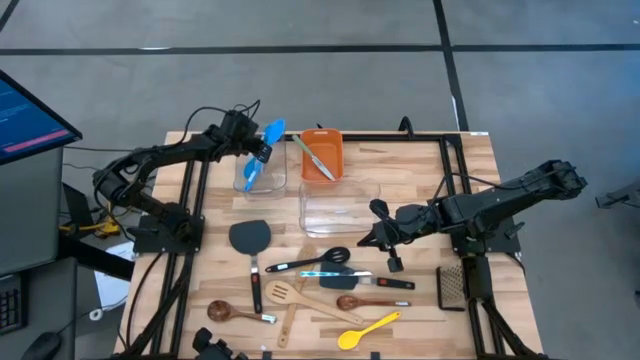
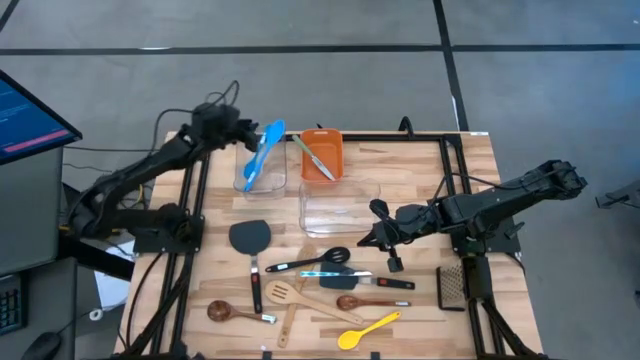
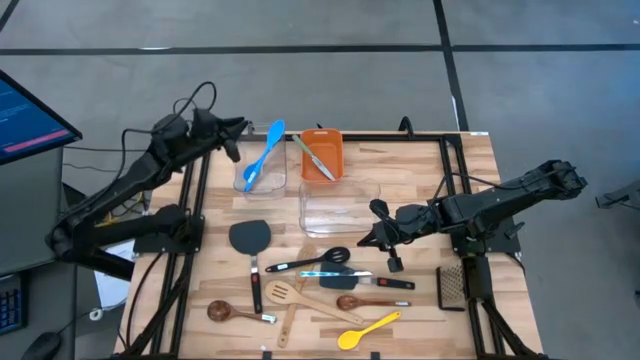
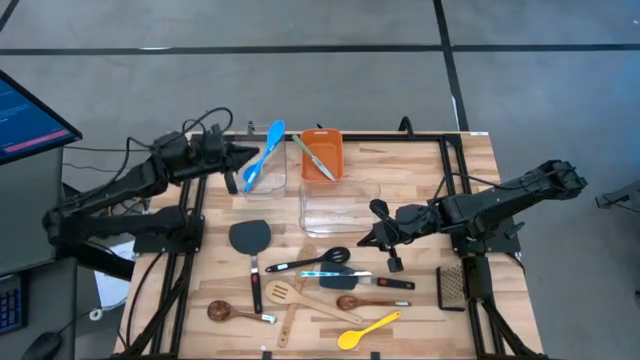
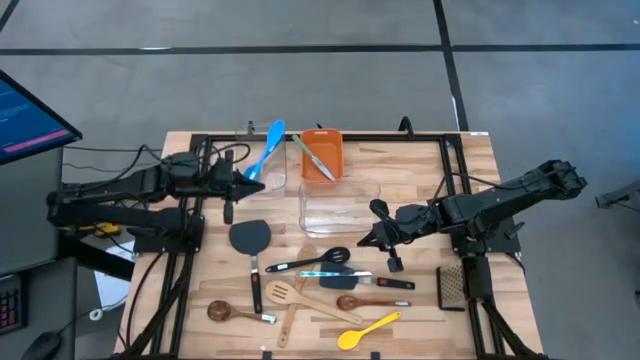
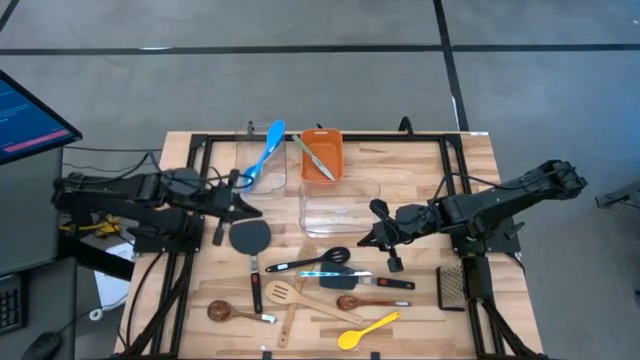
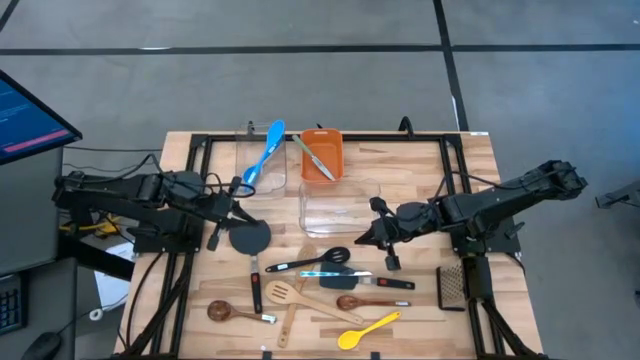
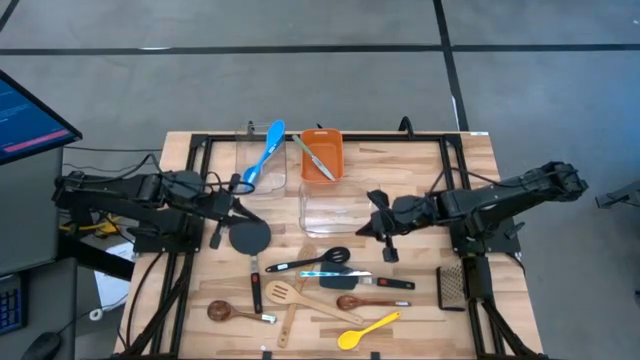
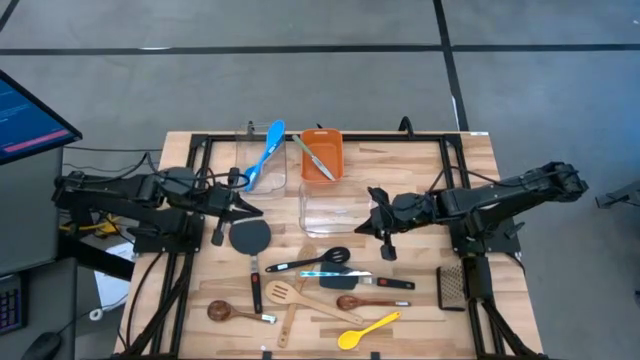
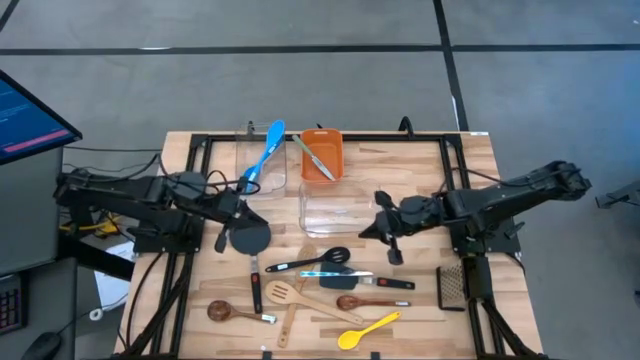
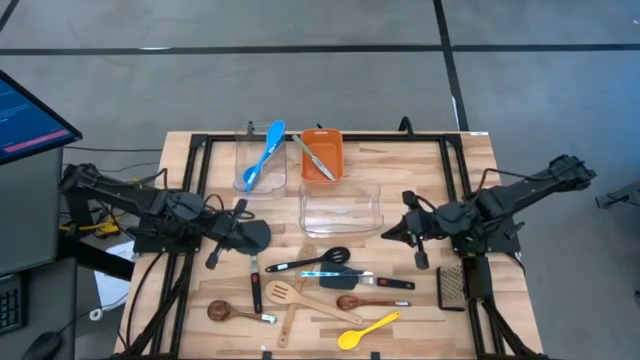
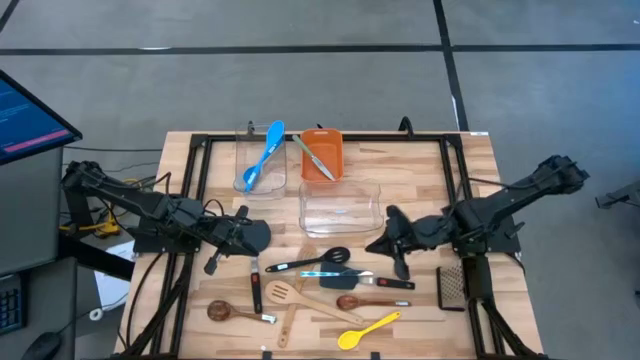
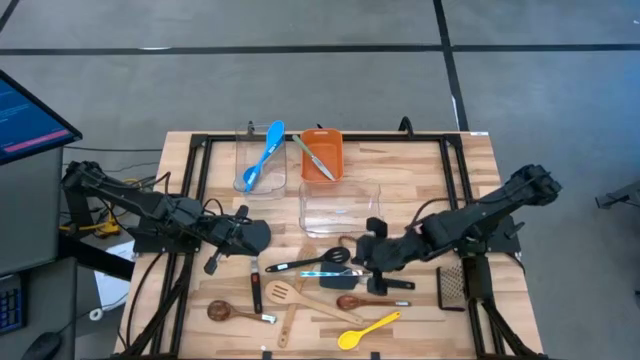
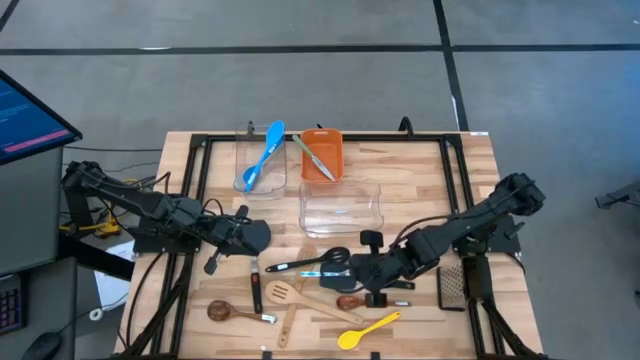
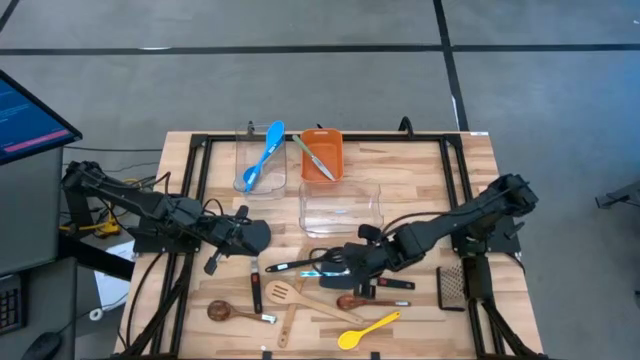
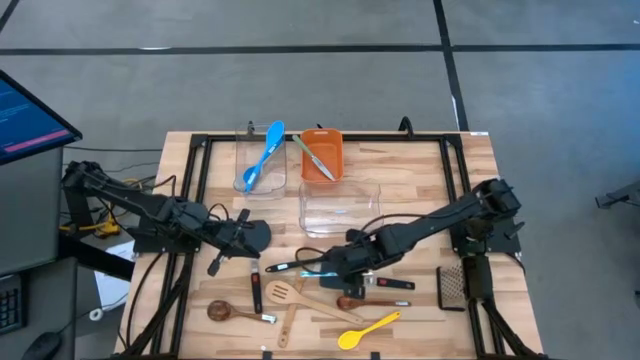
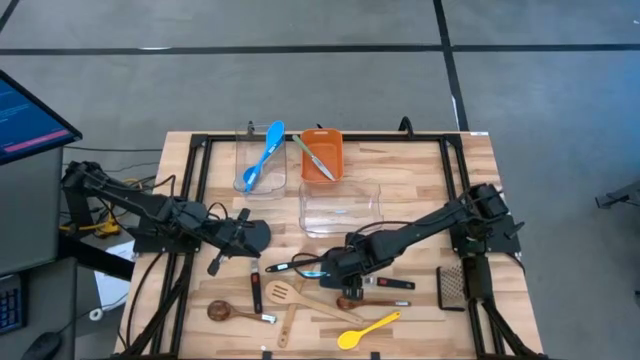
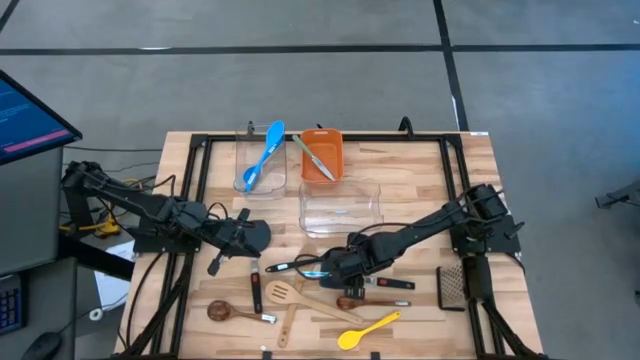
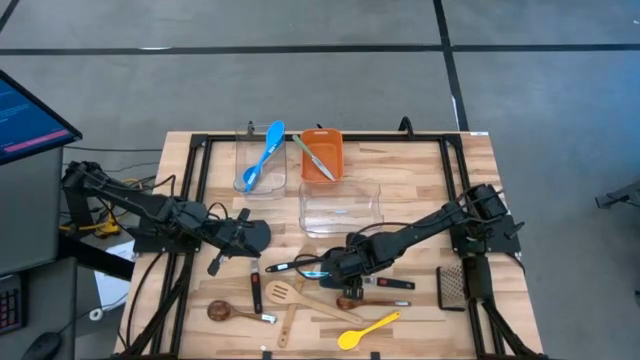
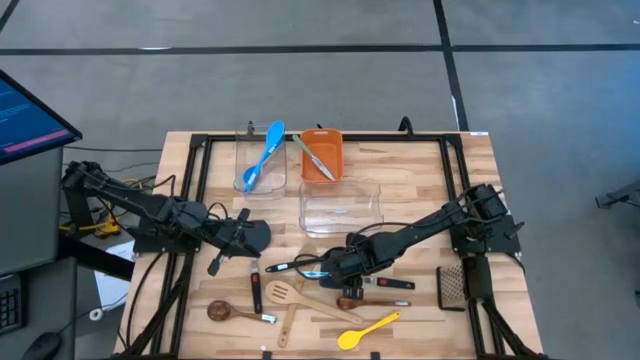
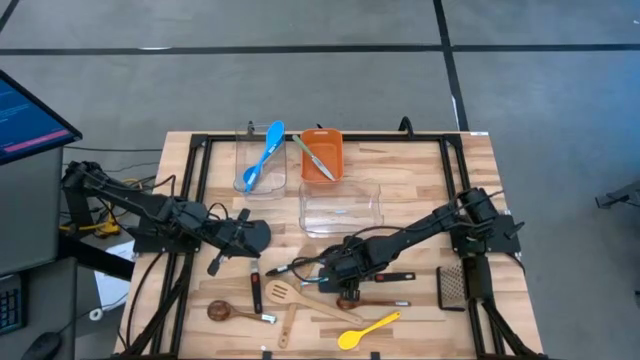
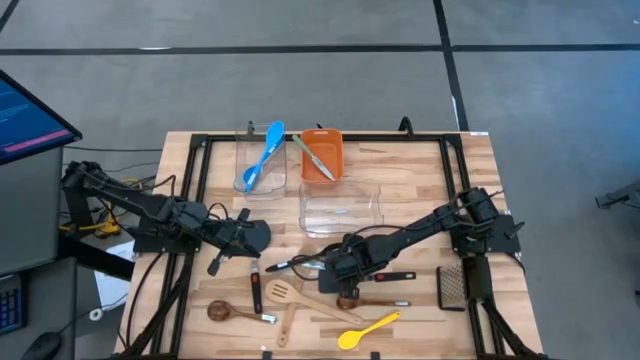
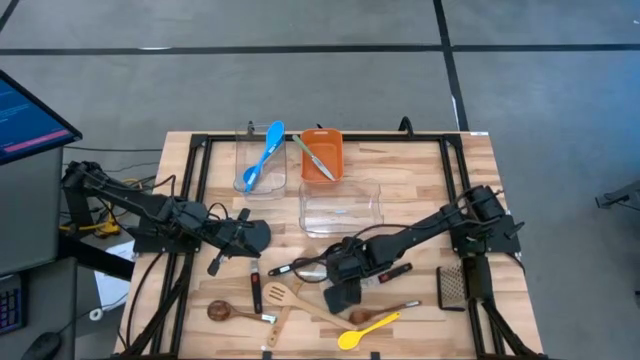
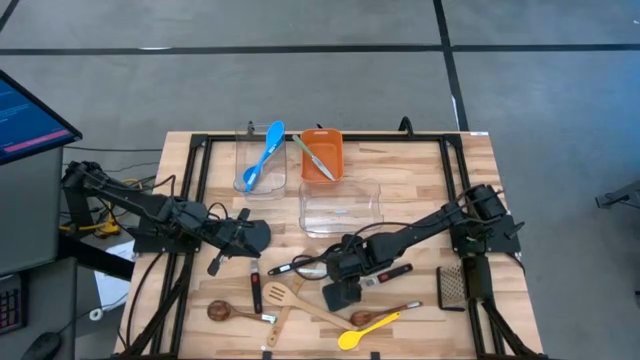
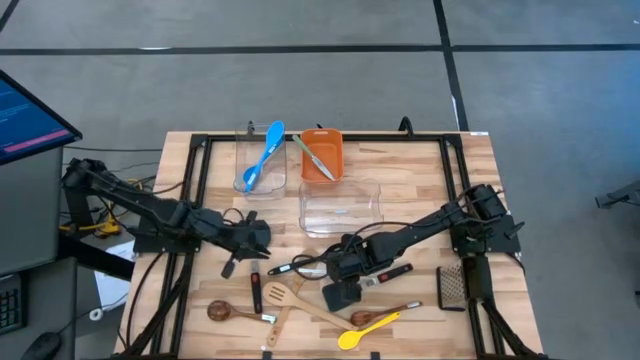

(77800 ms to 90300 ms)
Task: Pick & Place Kitchen Items
Put the white table knife into the orange bin

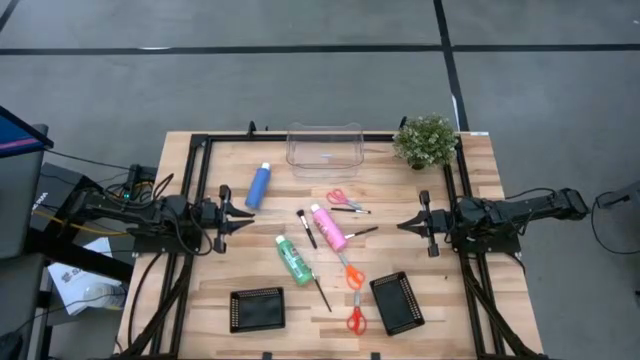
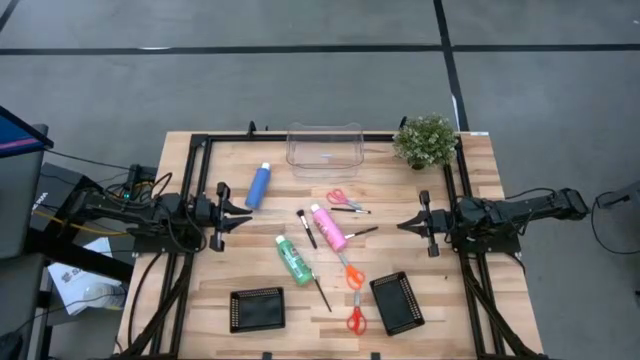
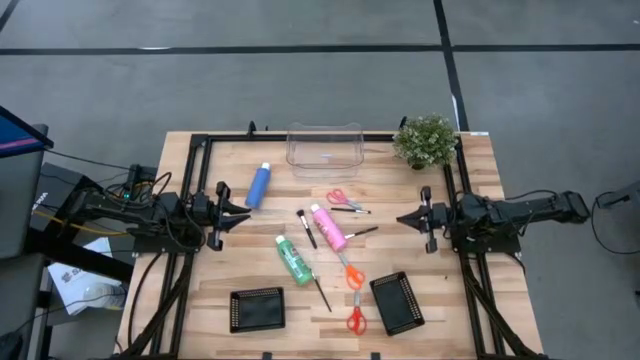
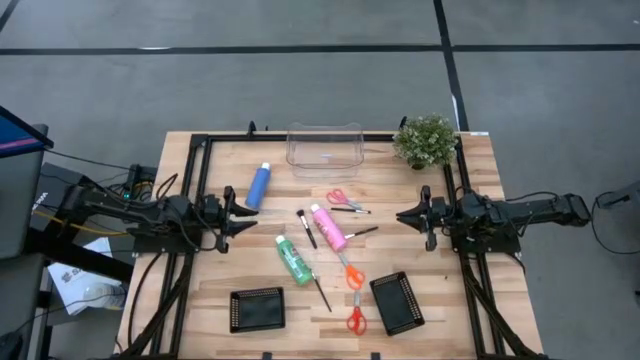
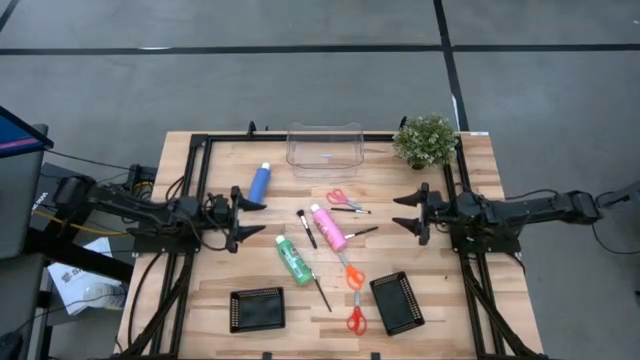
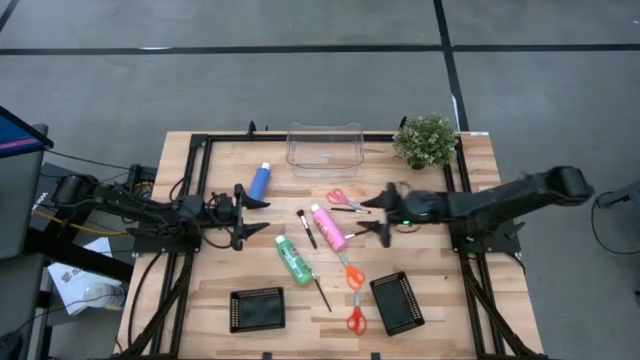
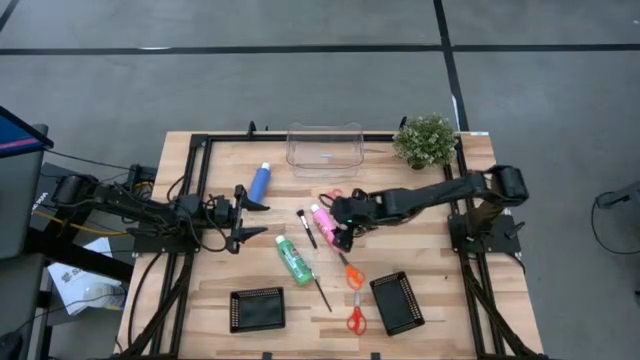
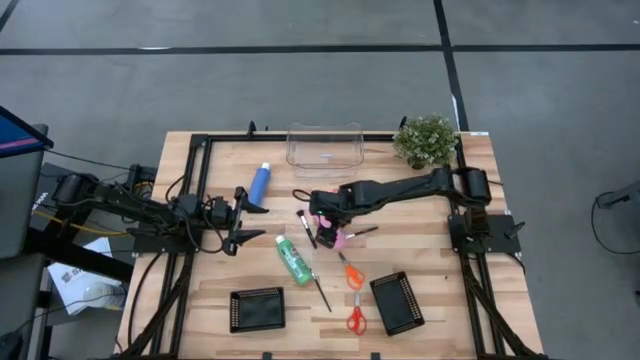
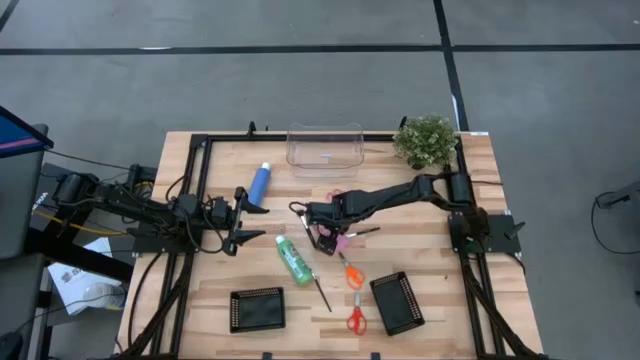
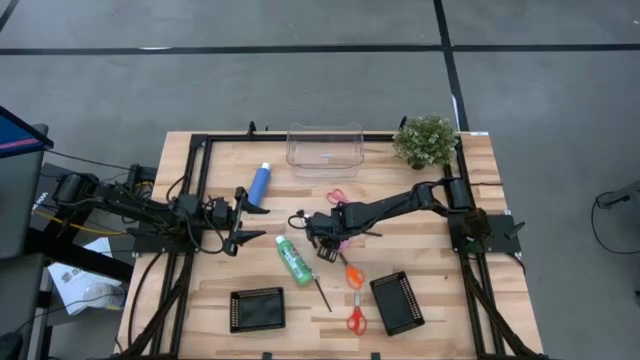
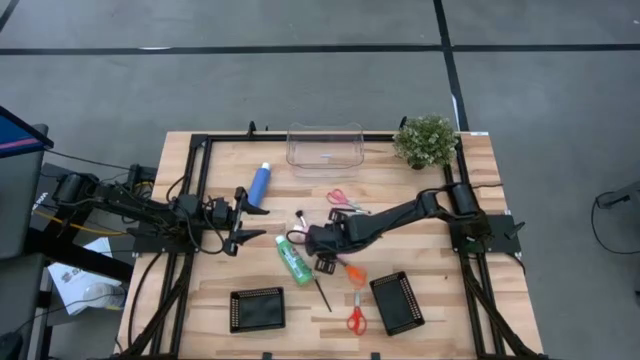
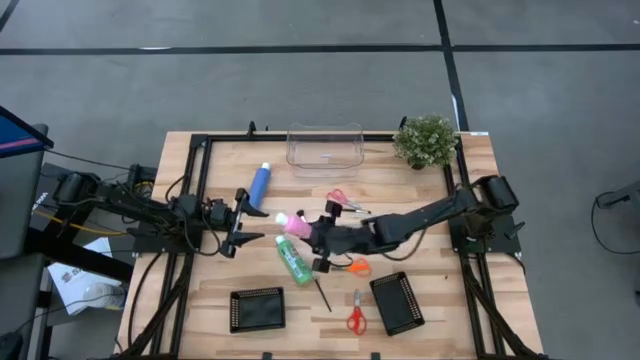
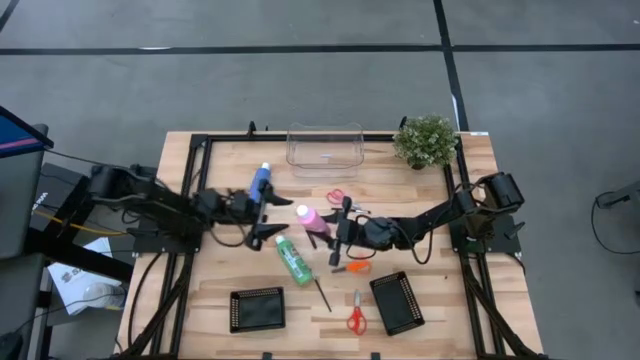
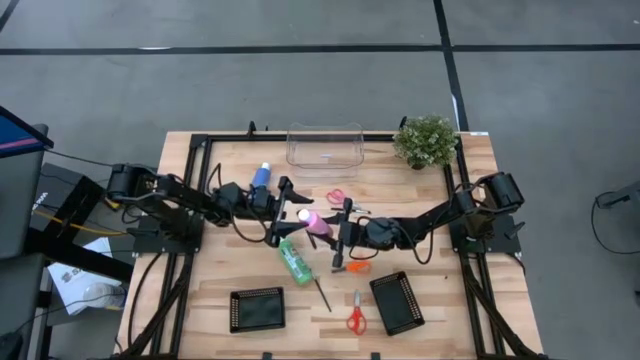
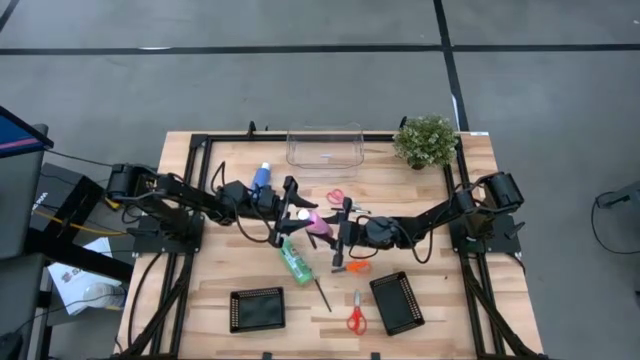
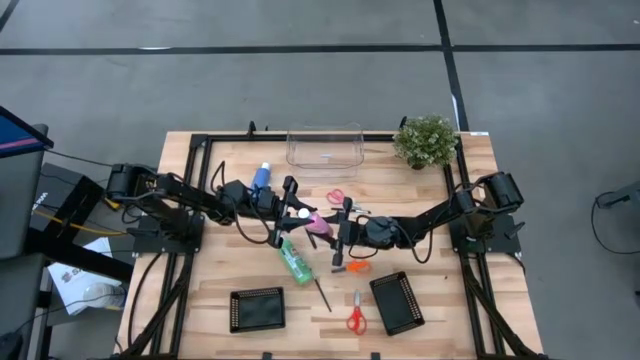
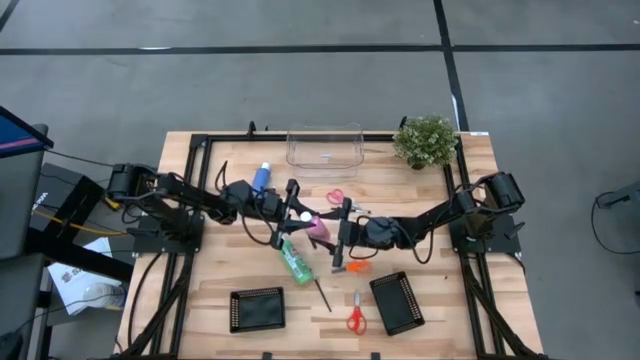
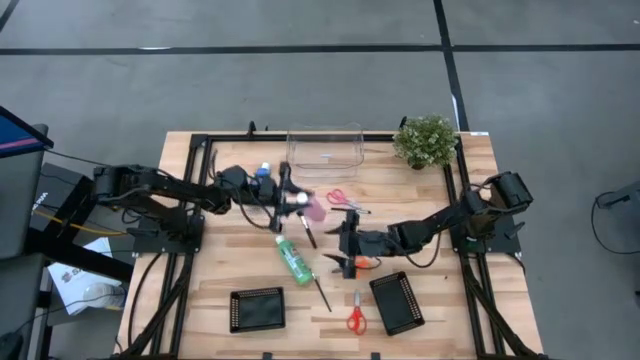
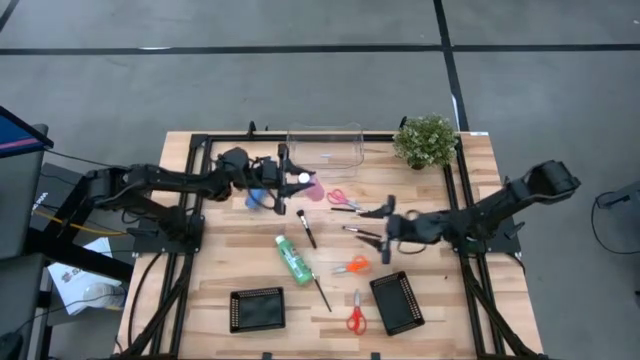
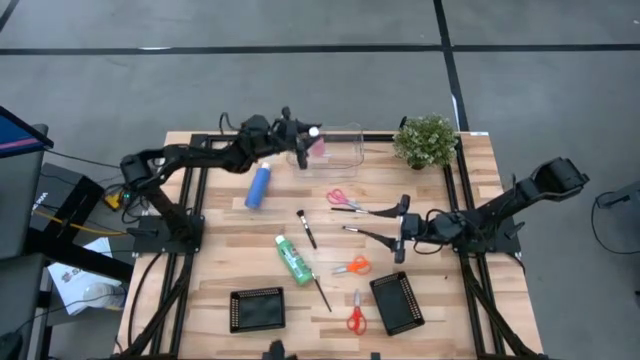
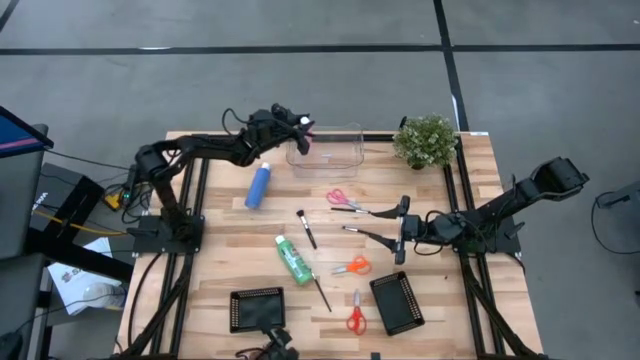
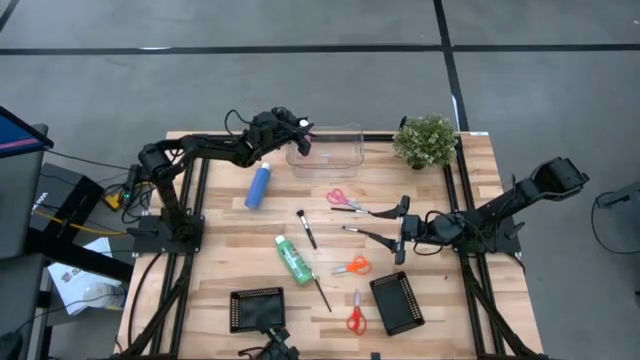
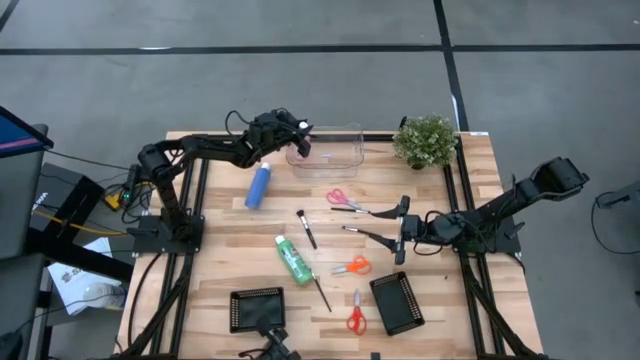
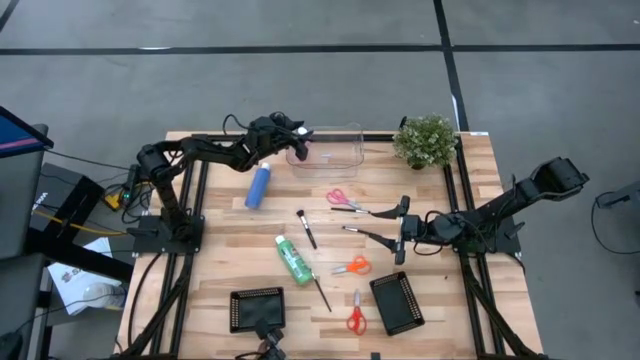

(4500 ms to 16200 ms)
Task: Pick & Place Paint Supplies
Put the pink paint bottle into the transparent bin
